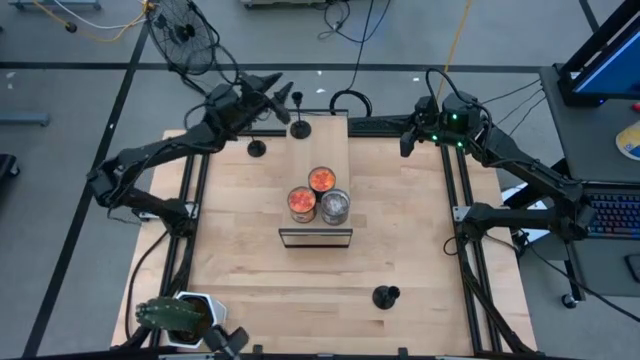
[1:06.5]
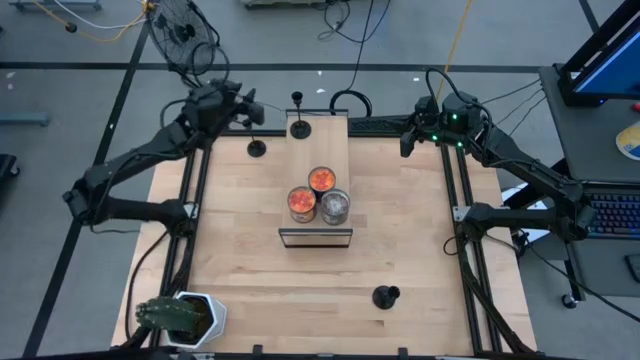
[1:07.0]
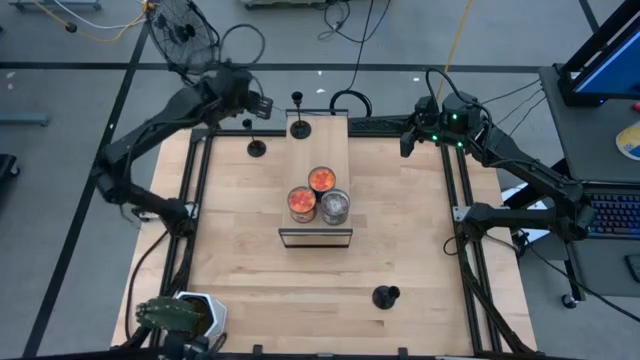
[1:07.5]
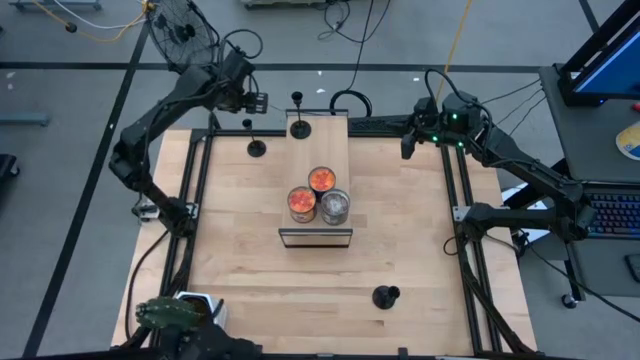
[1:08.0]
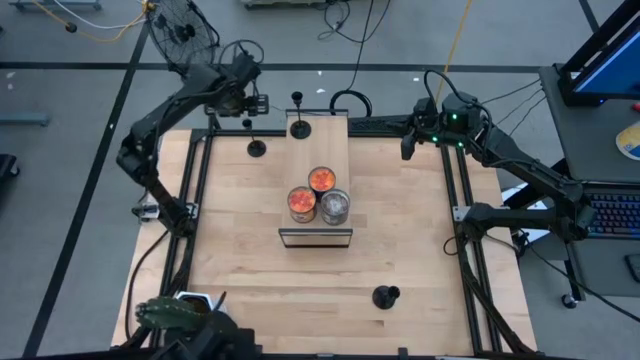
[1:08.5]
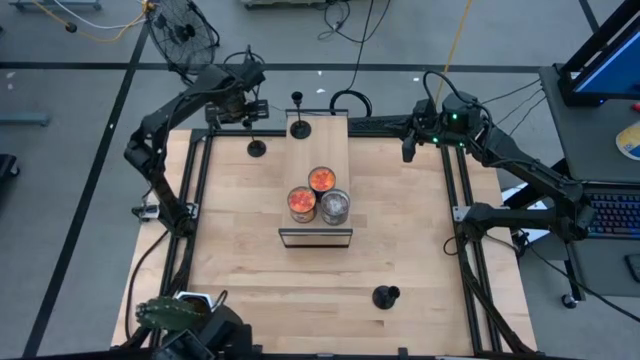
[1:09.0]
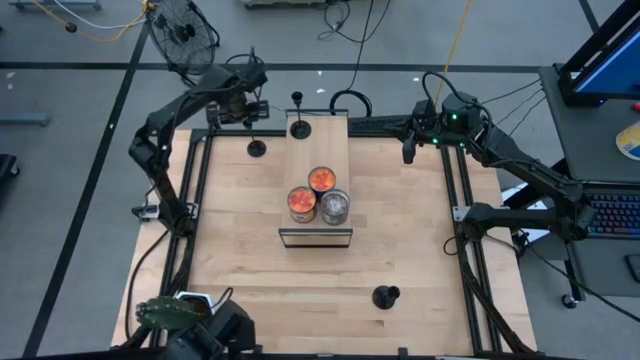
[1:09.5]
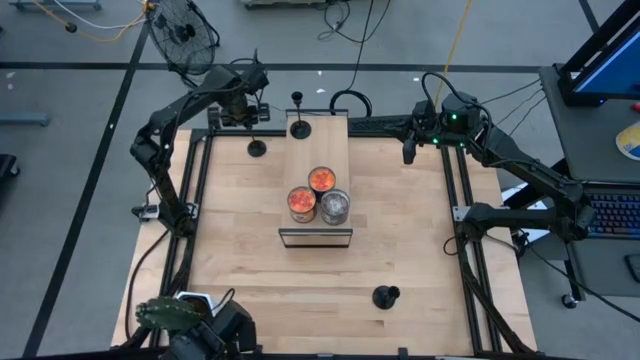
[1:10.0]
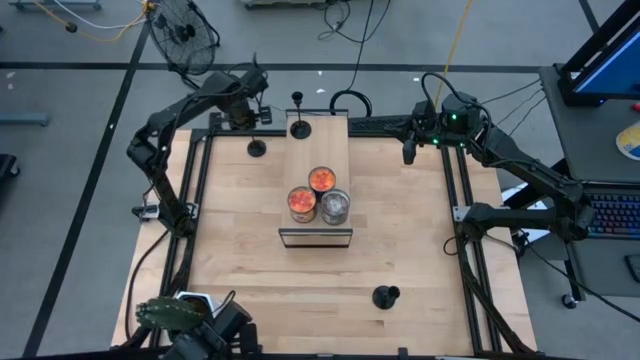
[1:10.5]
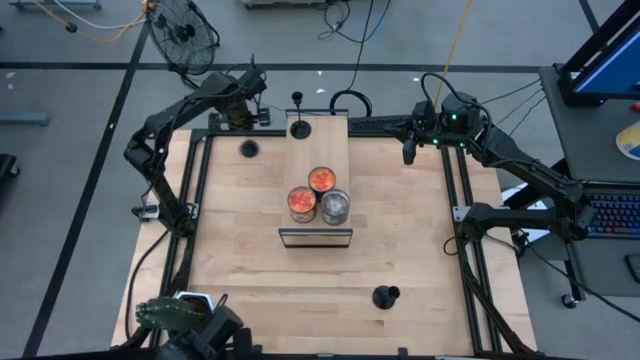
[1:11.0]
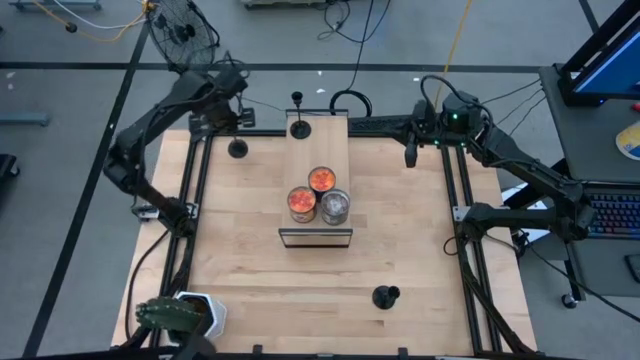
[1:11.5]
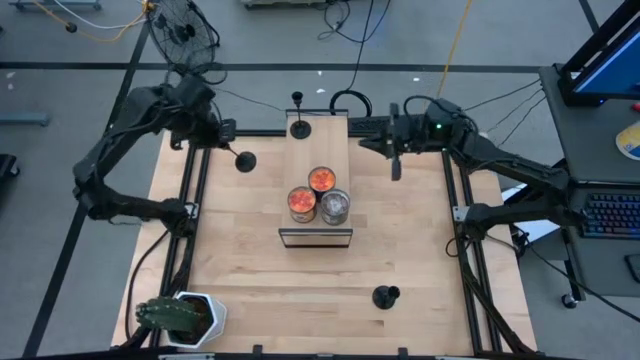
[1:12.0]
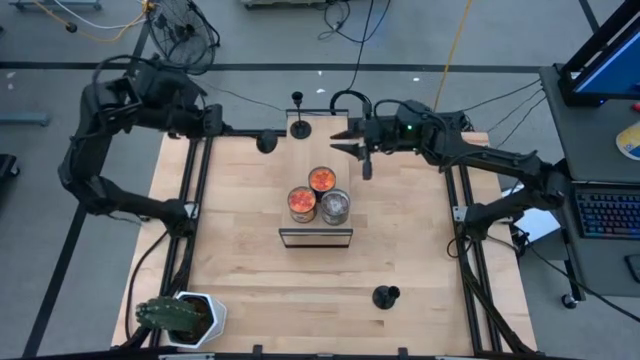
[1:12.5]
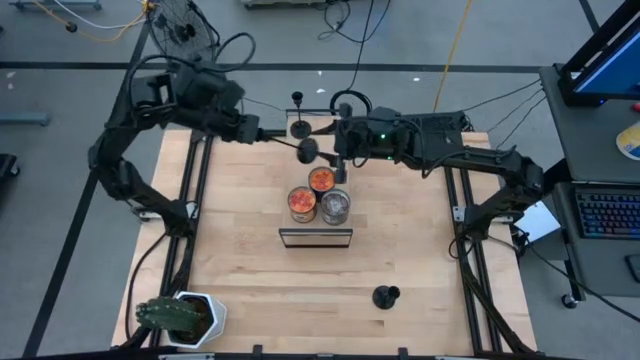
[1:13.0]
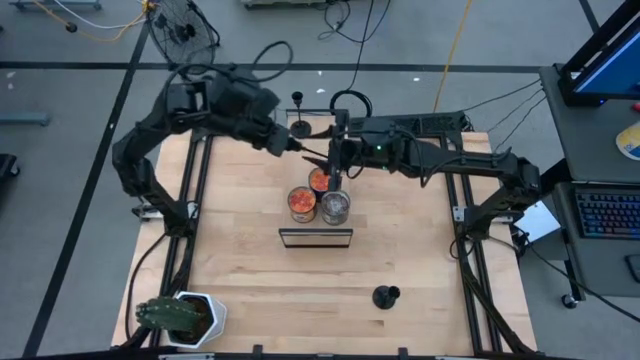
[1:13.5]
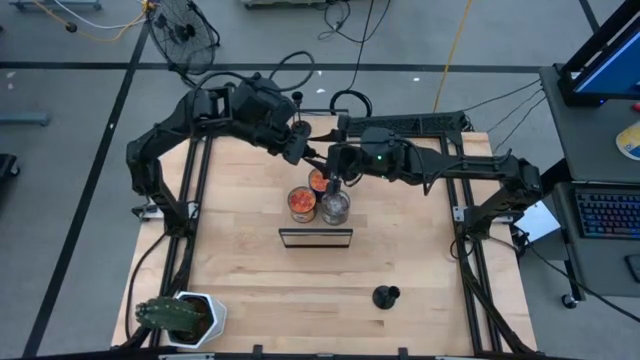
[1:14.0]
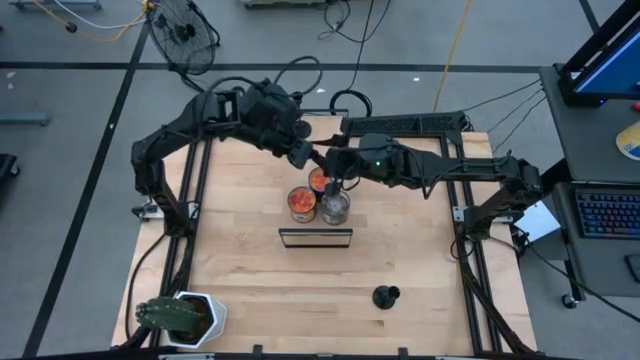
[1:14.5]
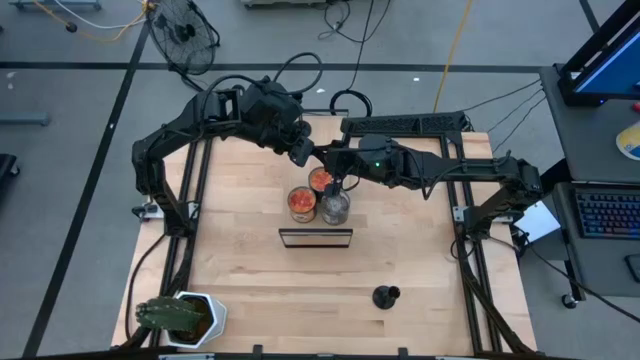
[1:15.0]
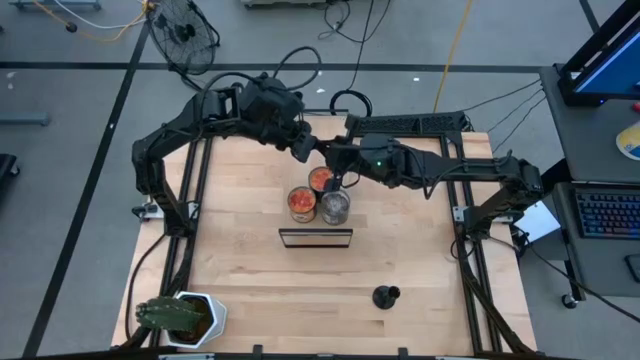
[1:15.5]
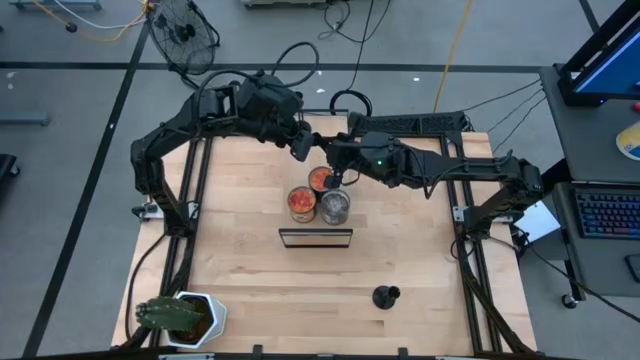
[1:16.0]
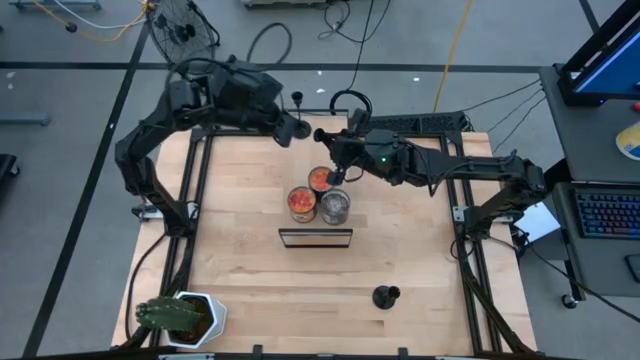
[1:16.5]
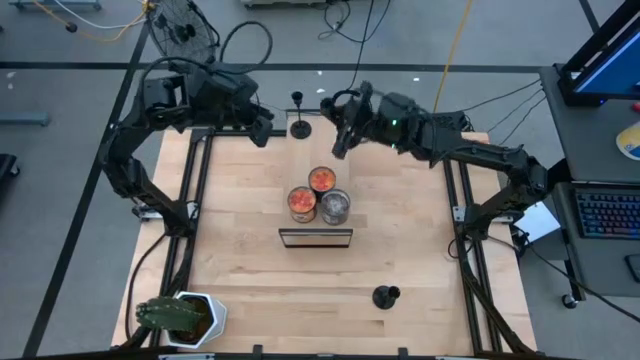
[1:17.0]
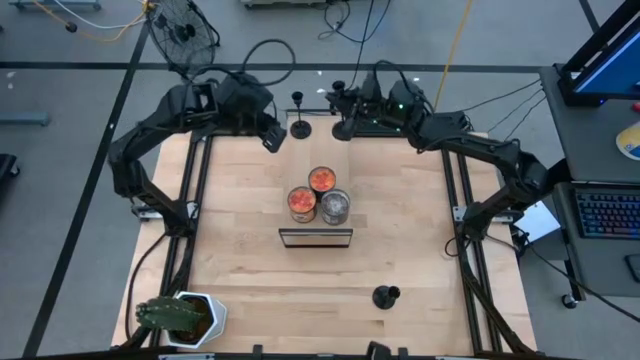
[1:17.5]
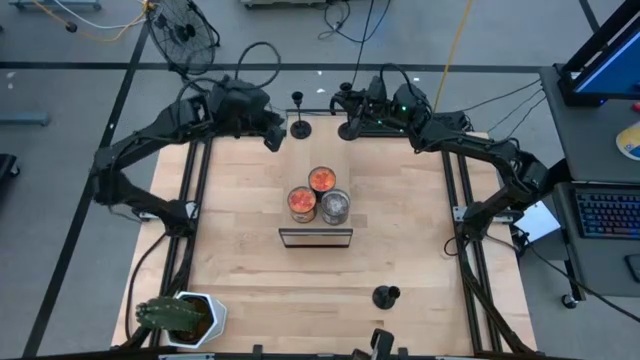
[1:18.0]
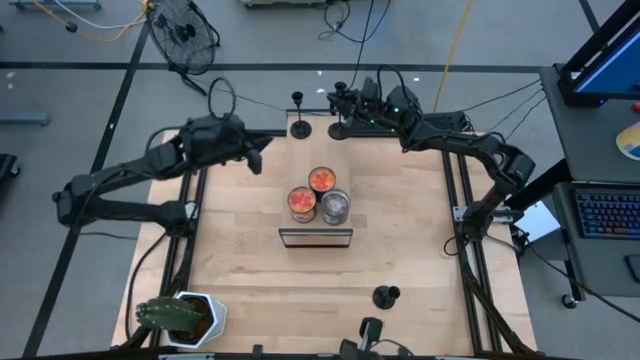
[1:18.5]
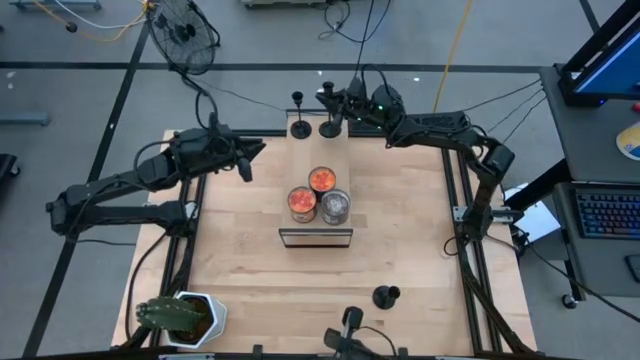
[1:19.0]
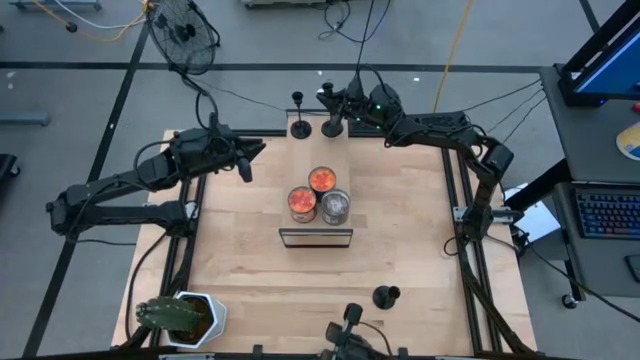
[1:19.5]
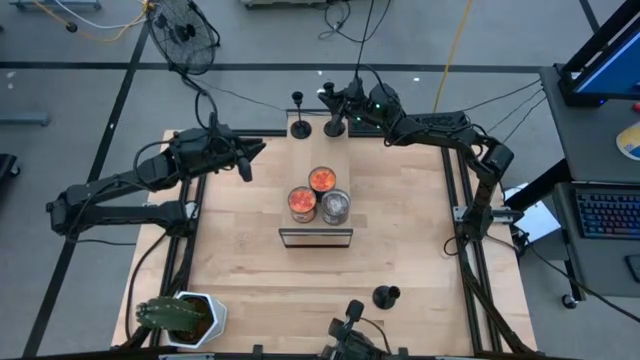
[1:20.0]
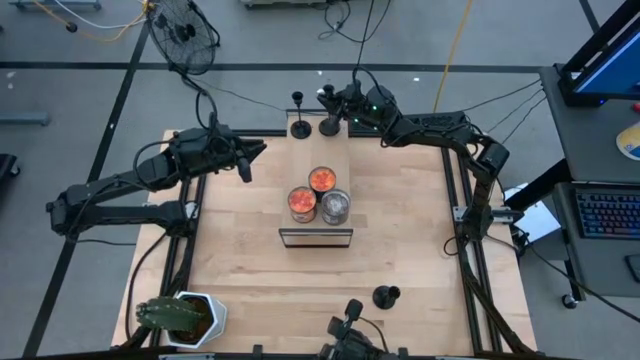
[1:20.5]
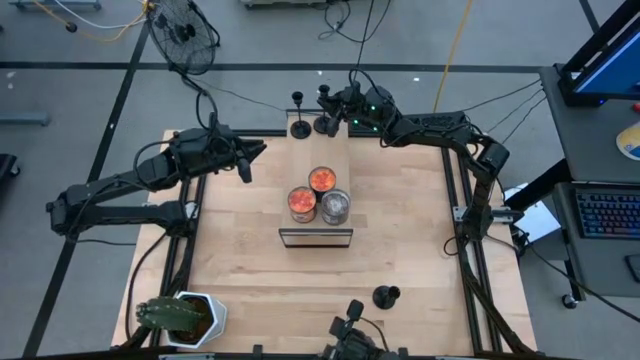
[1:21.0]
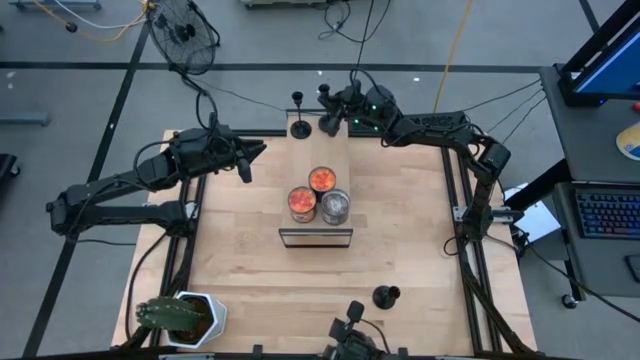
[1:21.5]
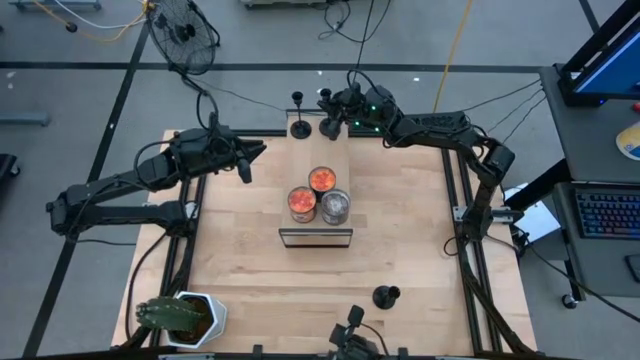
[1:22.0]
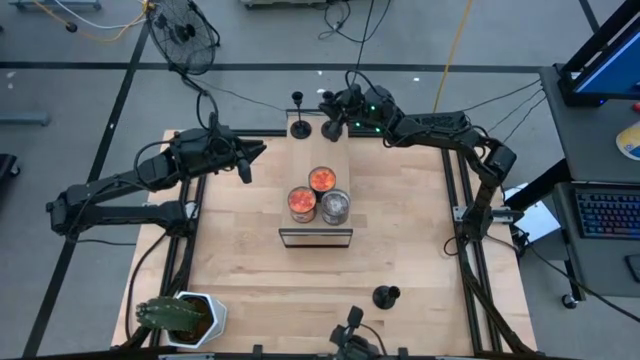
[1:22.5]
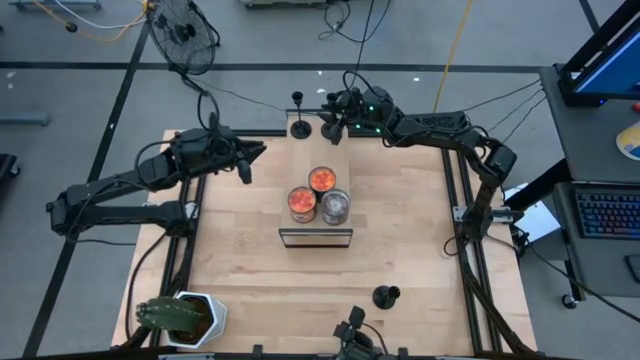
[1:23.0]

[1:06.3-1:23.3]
Task: Pick & Place candle stick holders
Put the top black candle holder on the shelf

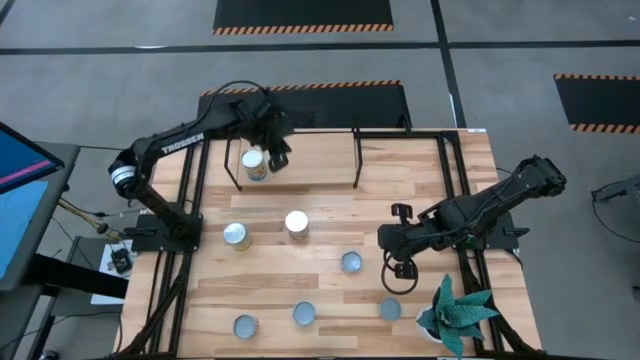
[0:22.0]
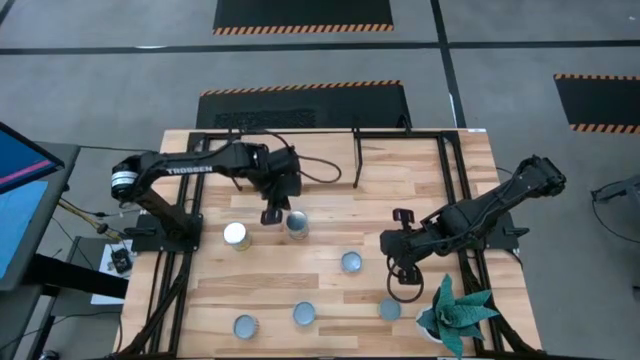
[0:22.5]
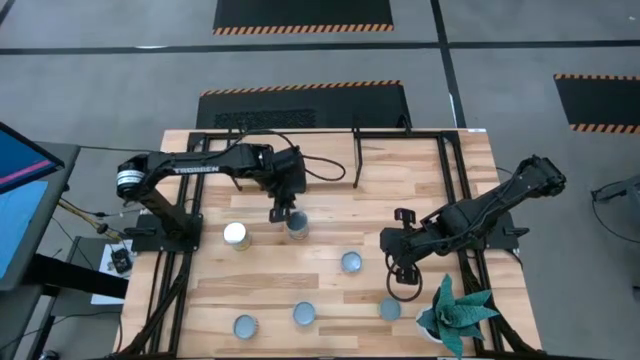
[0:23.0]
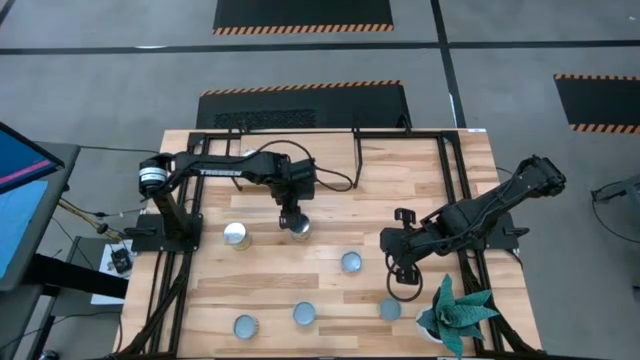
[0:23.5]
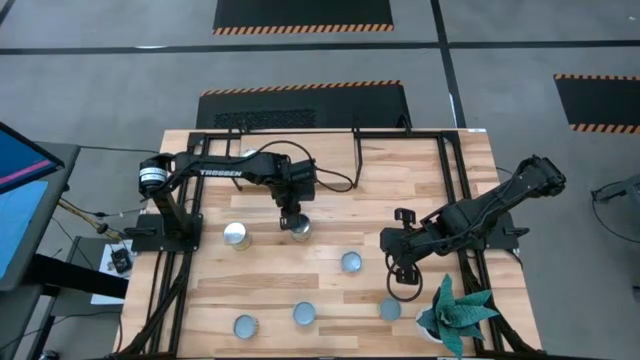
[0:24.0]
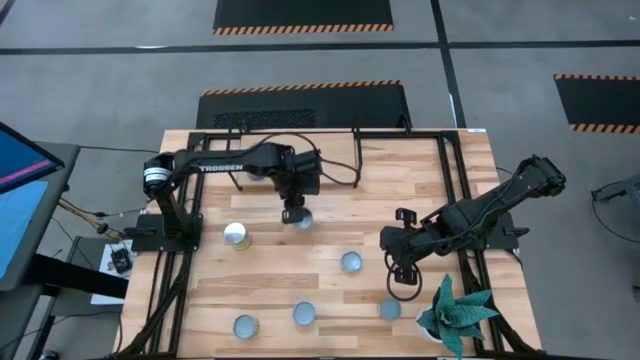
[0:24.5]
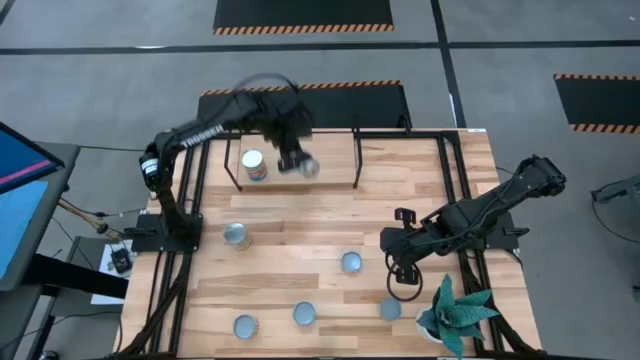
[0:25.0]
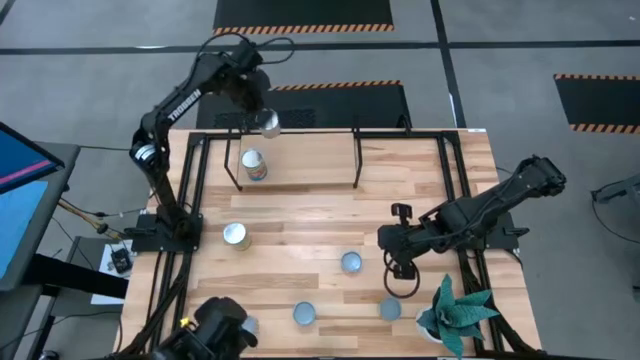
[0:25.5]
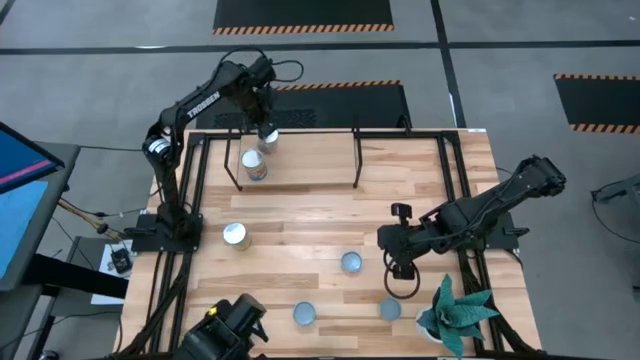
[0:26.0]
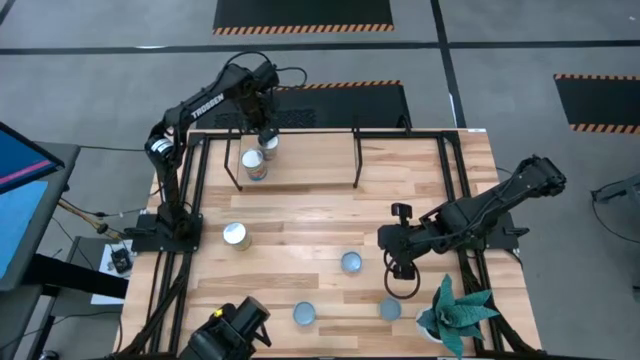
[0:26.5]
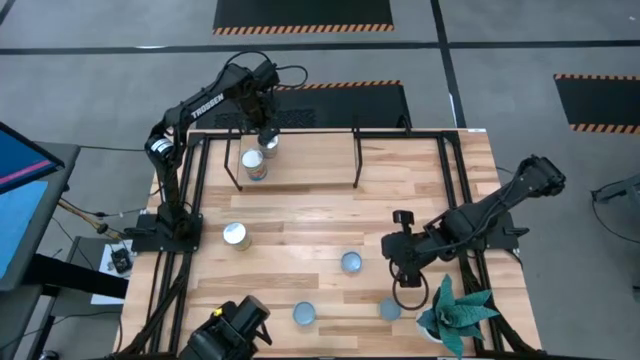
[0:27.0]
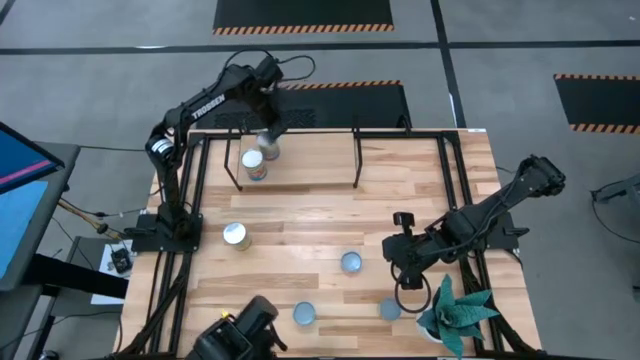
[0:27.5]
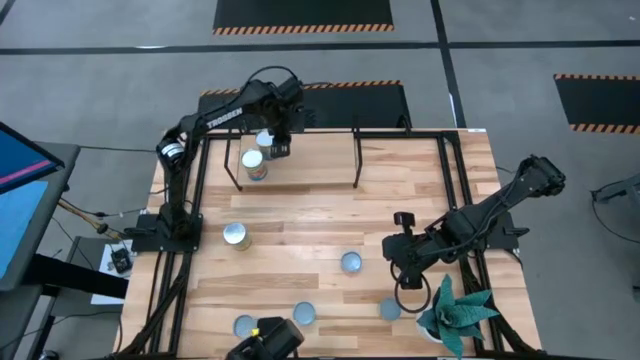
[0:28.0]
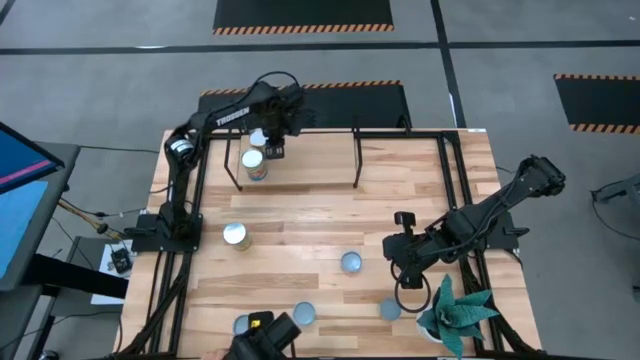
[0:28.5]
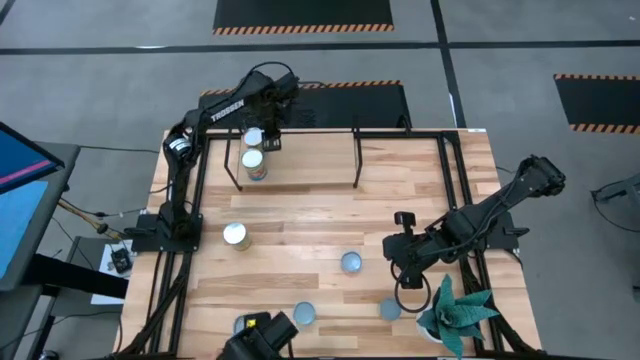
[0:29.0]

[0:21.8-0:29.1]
Task: Pick and place cans onto a shelf
Put the canned peaches on the shelf
